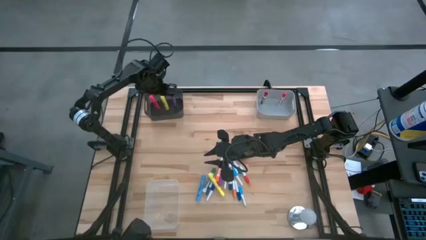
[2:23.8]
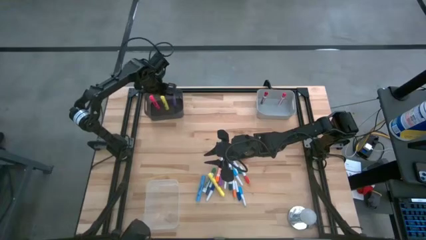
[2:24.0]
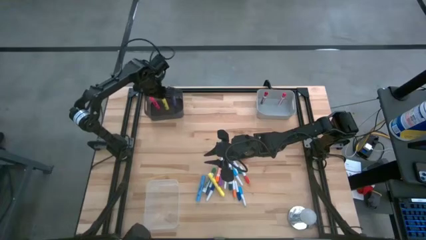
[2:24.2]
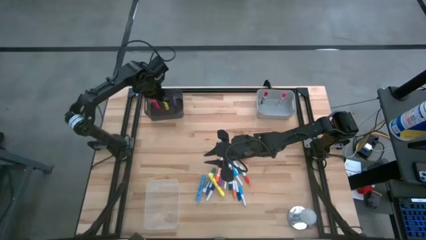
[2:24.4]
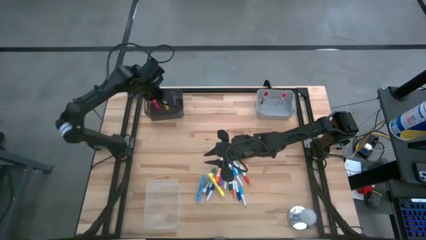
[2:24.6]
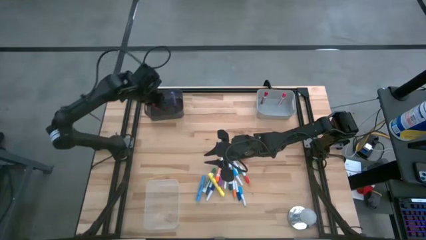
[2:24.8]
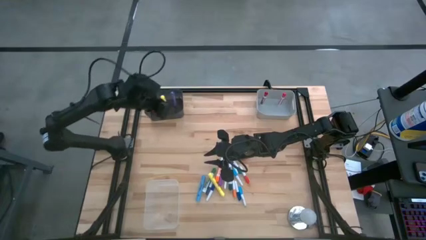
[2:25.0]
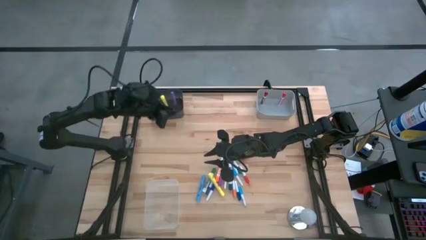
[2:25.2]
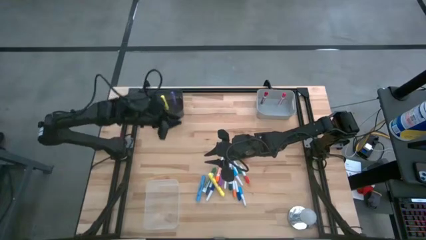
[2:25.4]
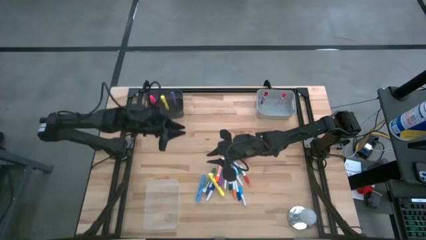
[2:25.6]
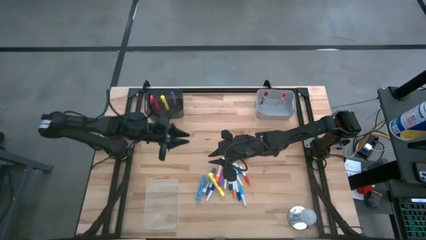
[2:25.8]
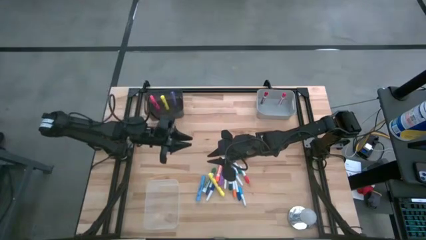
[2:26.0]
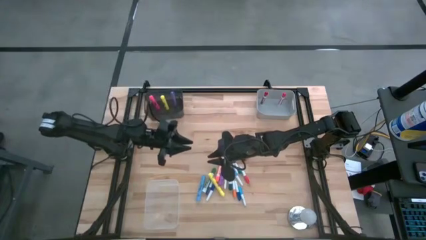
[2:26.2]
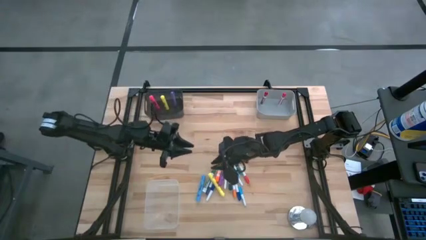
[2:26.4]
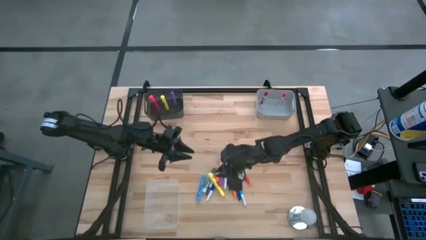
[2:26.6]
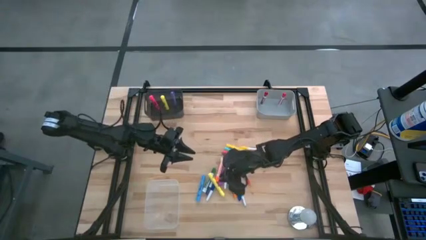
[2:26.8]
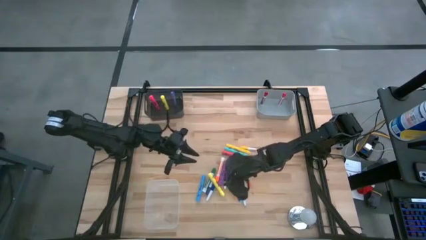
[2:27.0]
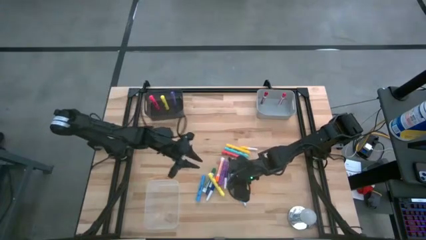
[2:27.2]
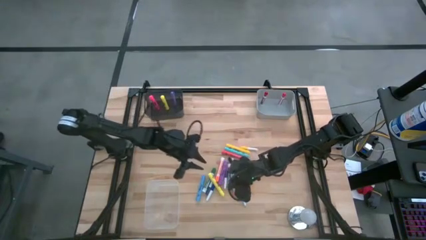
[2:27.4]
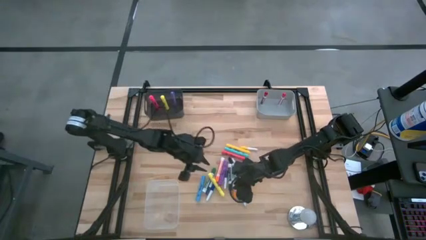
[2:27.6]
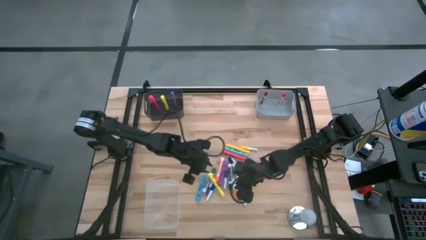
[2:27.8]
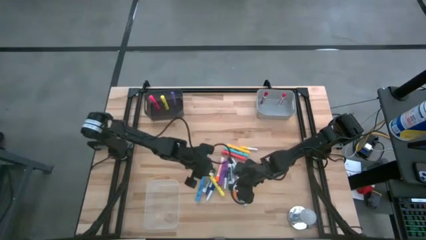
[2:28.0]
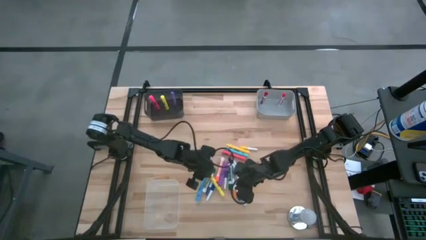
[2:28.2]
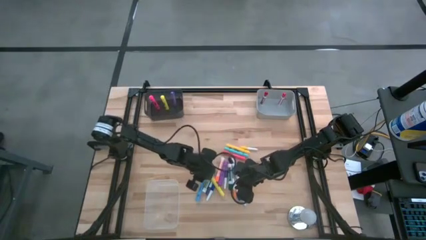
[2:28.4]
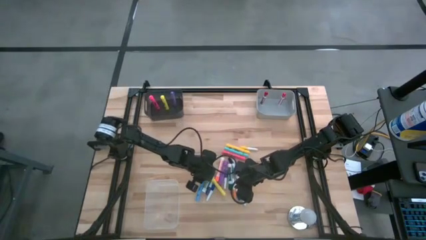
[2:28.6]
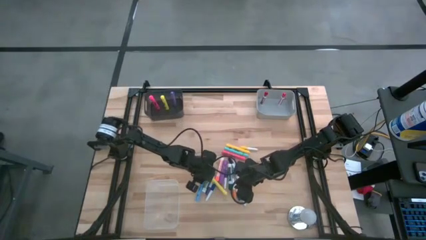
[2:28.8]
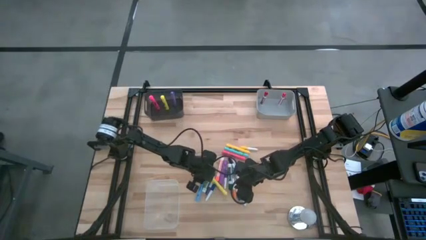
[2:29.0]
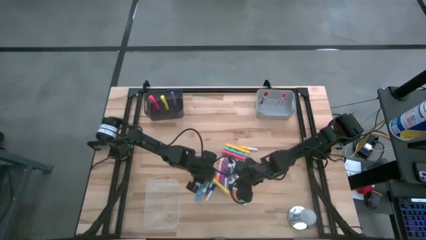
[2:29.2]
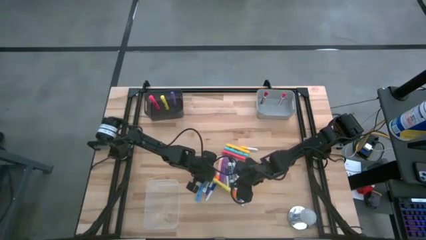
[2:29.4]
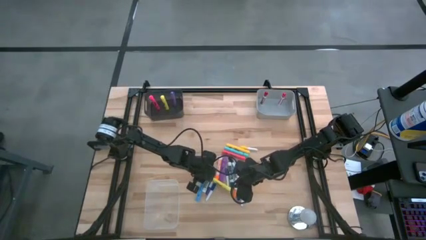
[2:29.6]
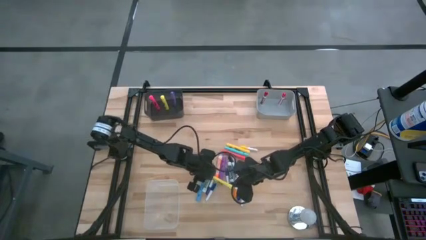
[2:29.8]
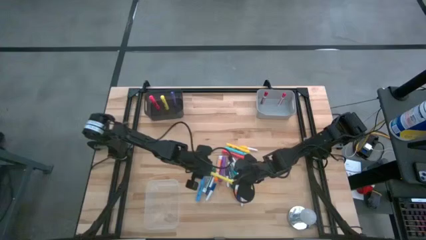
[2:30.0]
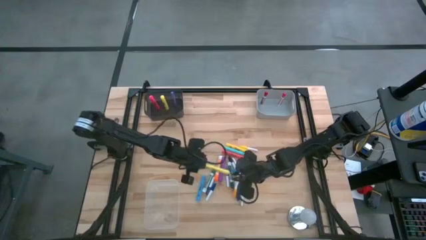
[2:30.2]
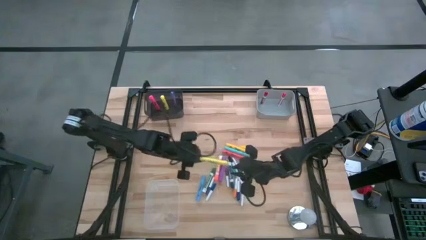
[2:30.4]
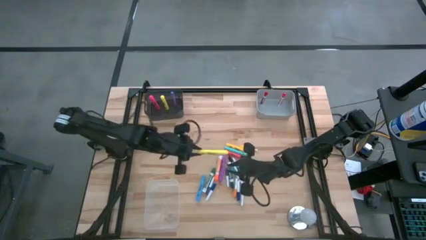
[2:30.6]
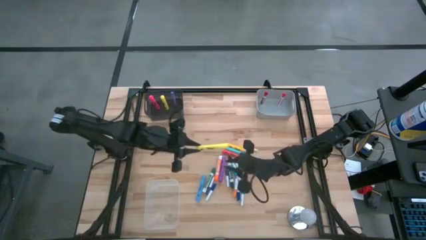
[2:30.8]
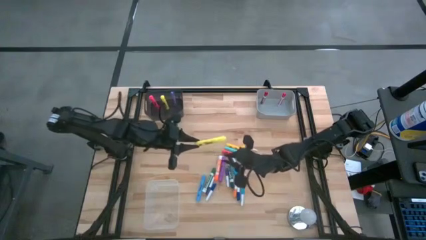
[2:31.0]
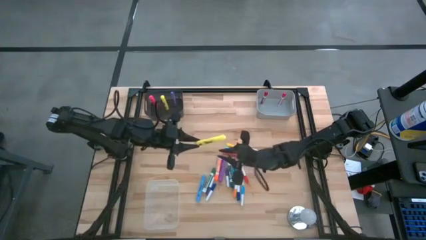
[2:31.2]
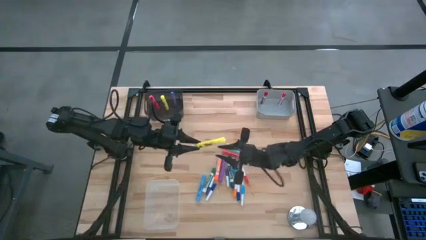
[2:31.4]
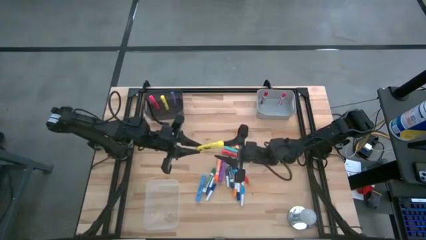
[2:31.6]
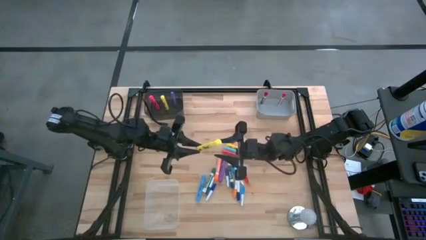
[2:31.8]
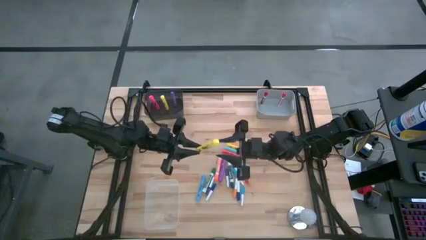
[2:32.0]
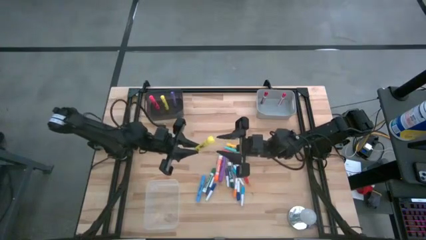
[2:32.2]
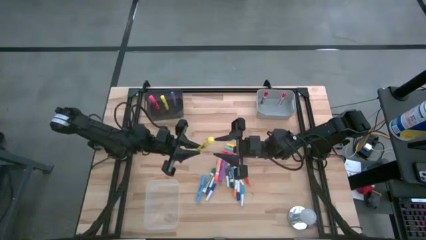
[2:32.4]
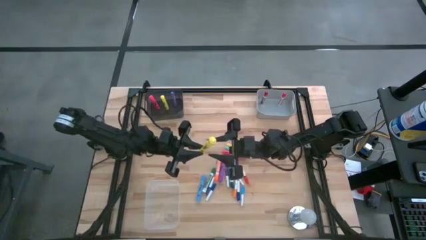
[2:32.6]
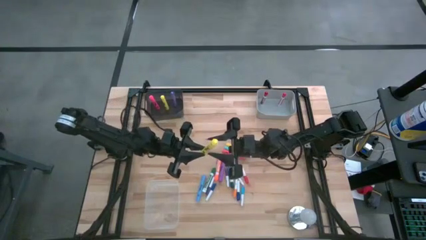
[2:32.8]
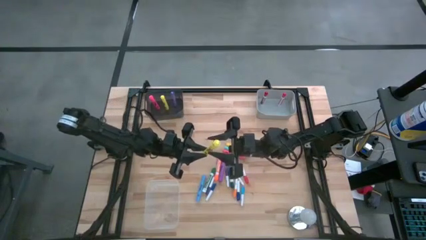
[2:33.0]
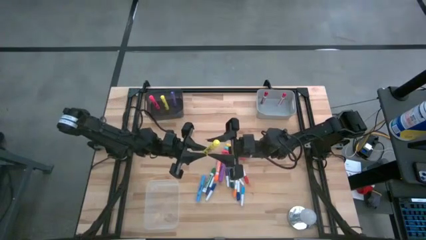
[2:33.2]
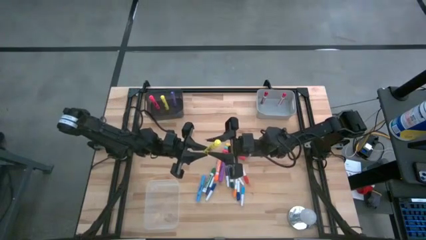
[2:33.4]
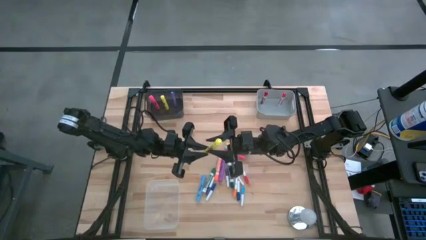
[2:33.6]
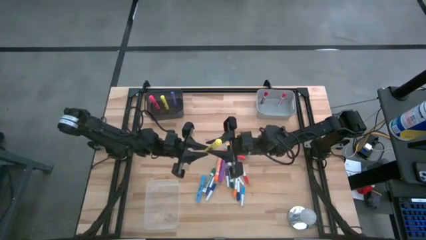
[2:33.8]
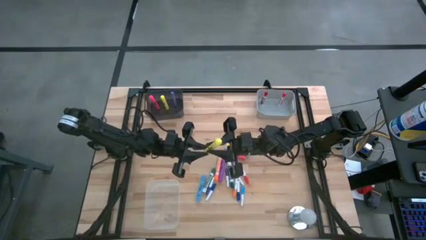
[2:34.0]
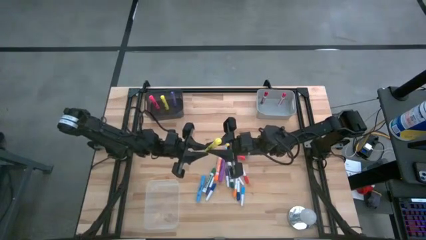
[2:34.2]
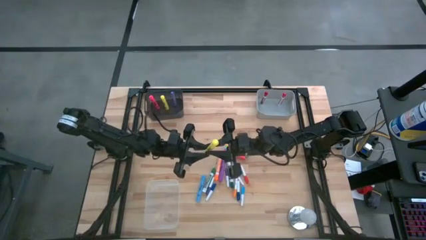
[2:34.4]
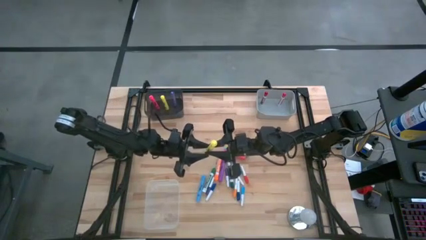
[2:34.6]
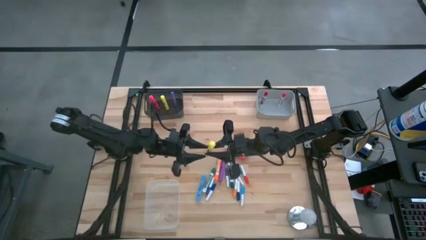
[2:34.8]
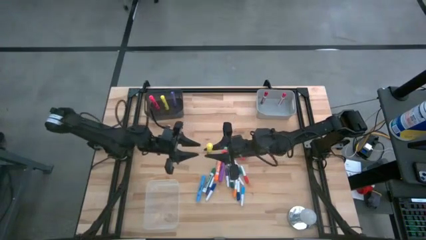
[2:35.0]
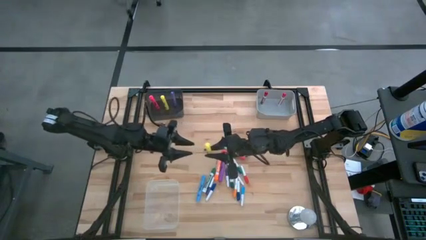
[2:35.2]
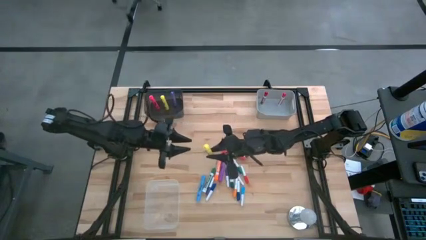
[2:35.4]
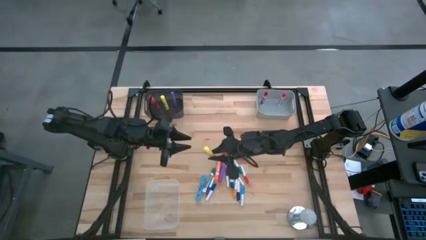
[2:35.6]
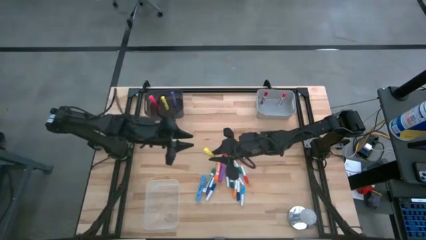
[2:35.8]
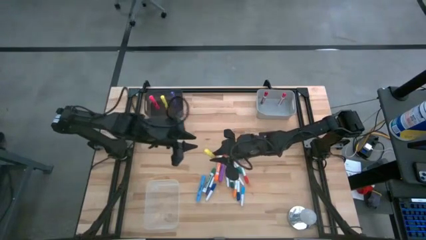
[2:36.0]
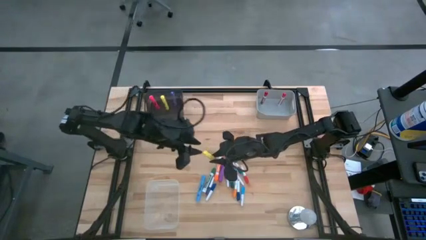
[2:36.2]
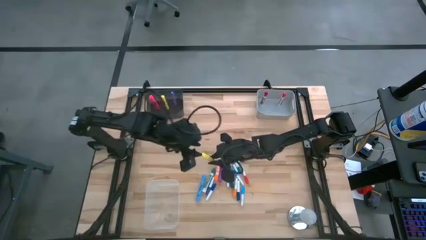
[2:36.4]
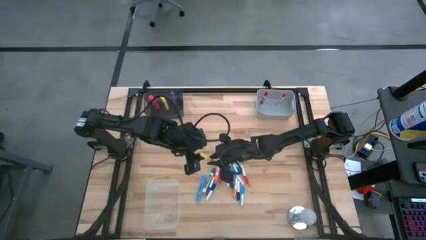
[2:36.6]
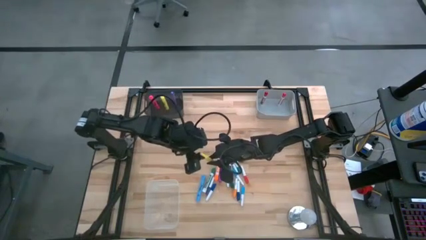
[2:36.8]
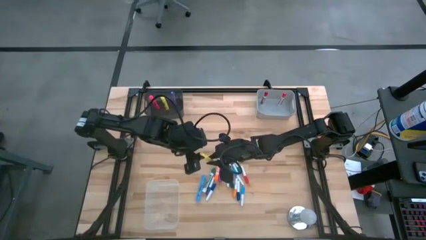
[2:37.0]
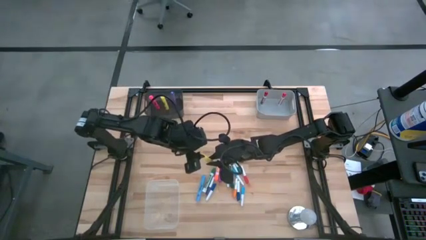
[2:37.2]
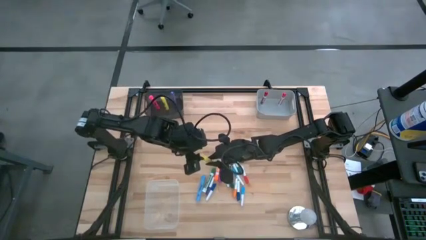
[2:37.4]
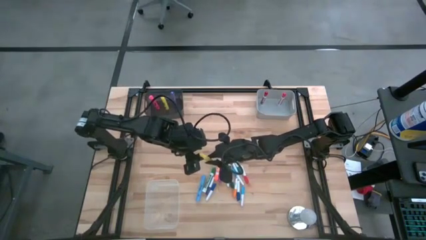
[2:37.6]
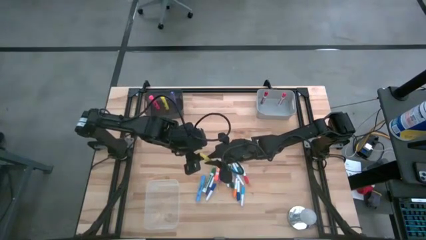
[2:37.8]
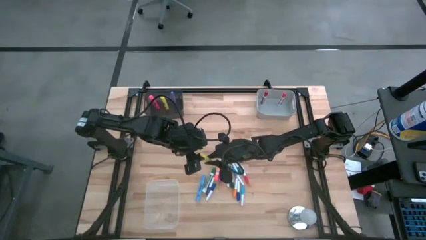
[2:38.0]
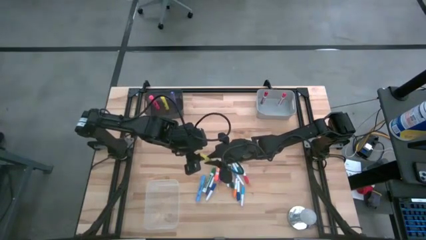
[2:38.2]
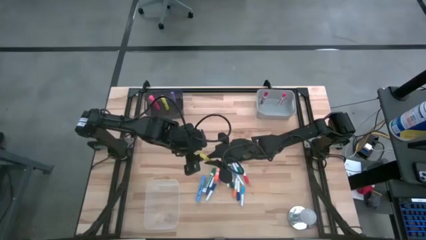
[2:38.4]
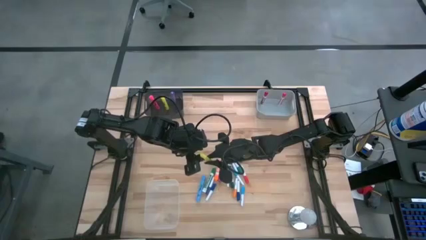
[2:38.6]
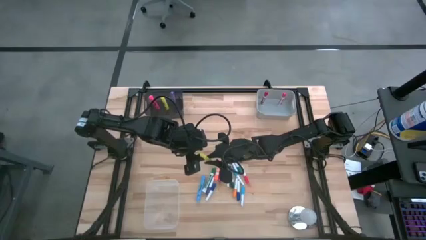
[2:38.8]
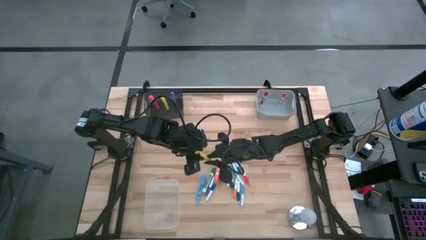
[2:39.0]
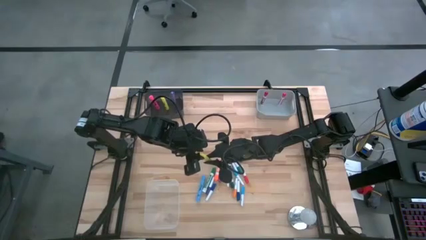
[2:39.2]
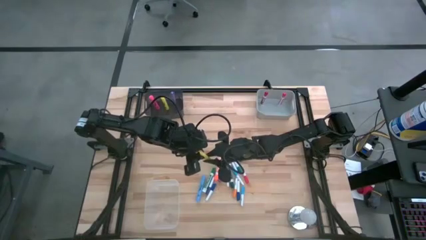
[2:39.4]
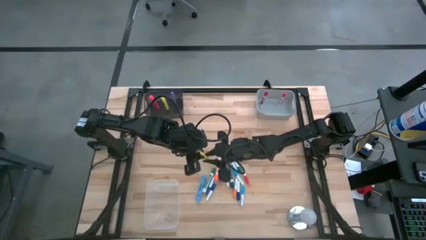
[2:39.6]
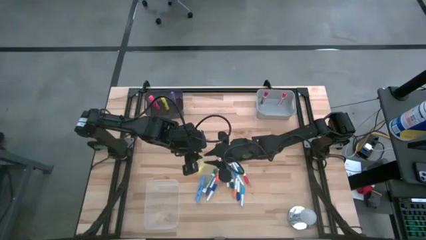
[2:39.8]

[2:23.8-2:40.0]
Task: Pick & Place Markers
Put the yellow highlighter pen into the black bin

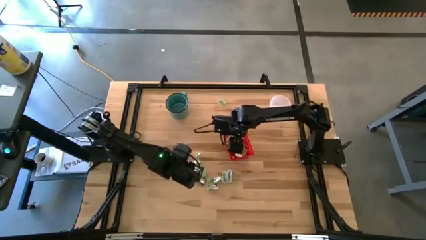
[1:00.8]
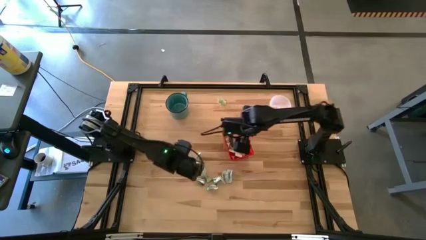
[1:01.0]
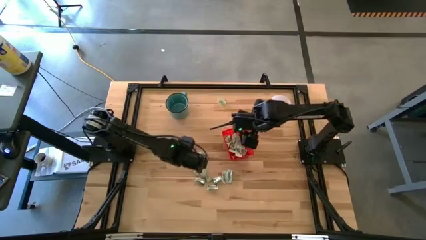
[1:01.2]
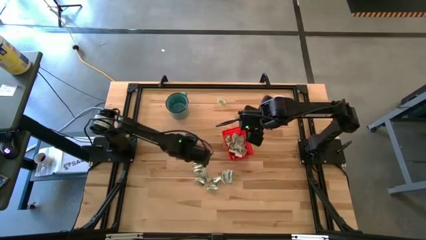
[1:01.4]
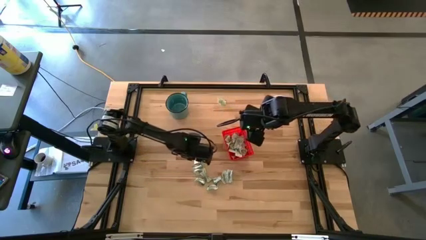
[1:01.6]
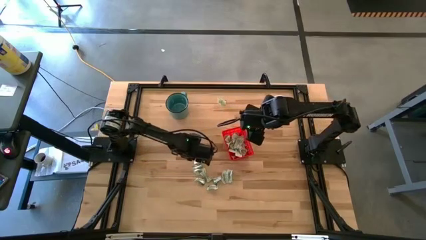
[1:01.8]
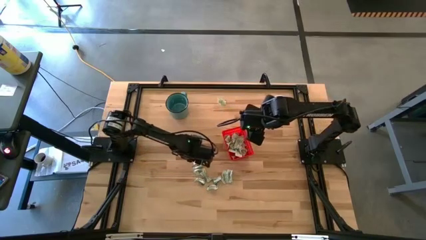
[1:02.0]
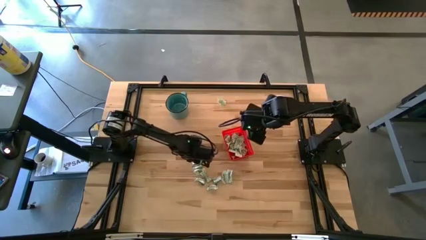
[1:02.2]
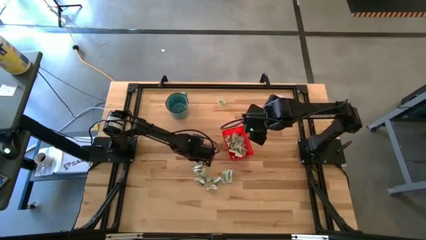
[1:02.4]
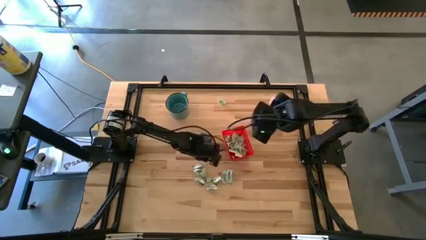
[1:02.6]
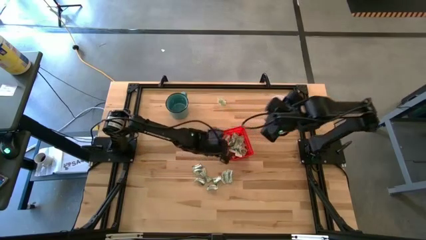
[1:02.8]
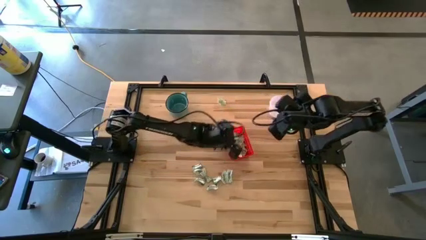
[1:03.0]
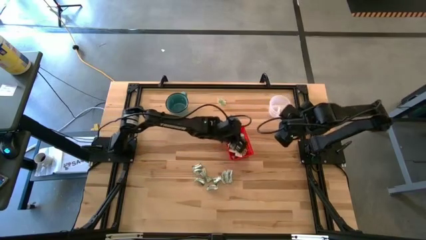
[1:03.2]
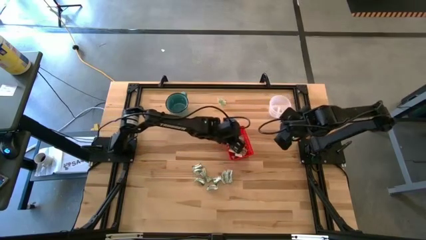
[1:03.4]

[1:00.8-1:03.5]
Task: Pick and place items into bin
Put the stevia packet into the orange bin
